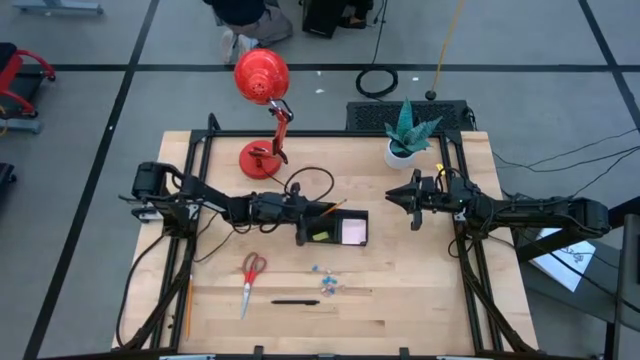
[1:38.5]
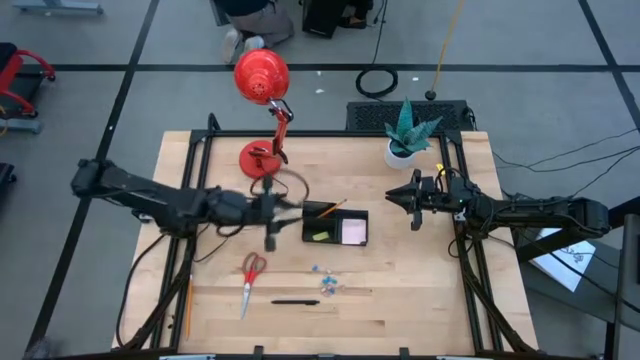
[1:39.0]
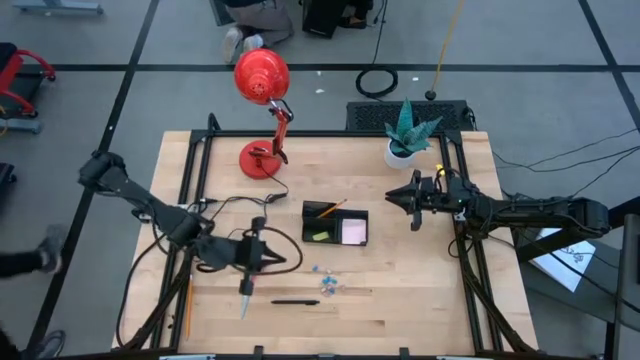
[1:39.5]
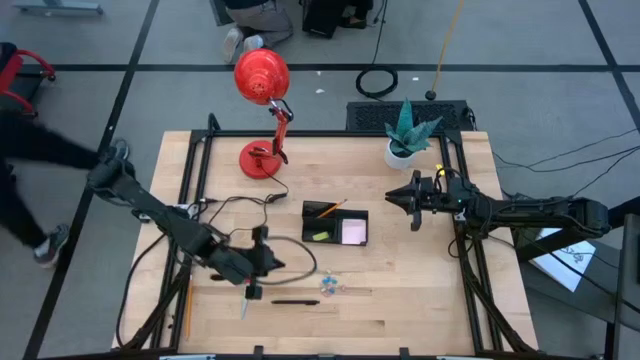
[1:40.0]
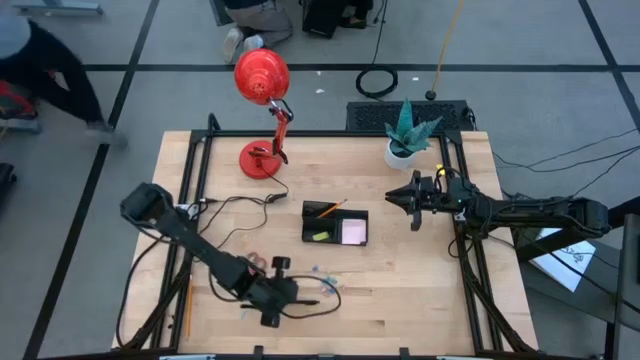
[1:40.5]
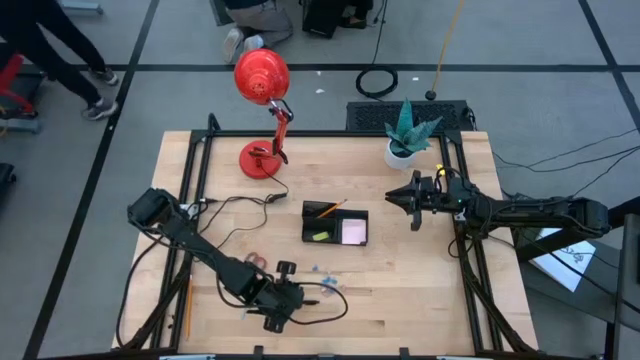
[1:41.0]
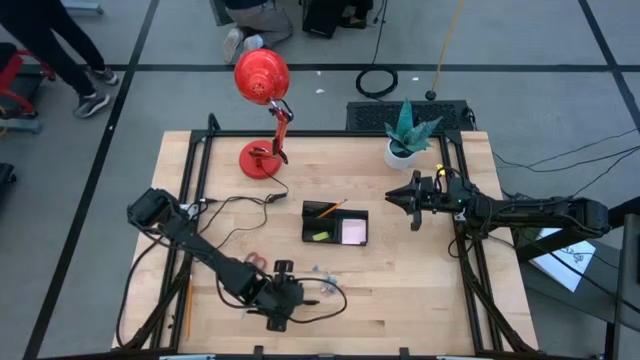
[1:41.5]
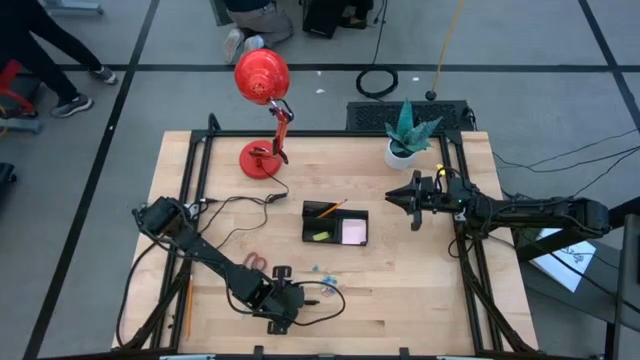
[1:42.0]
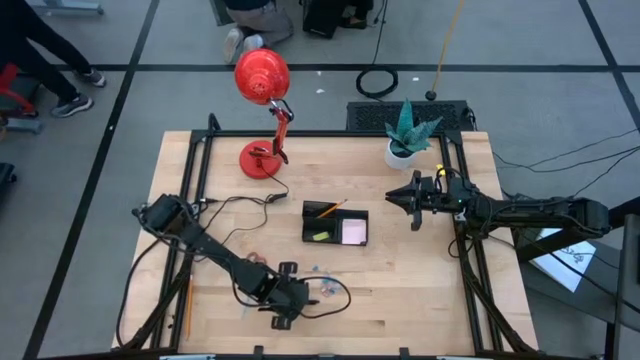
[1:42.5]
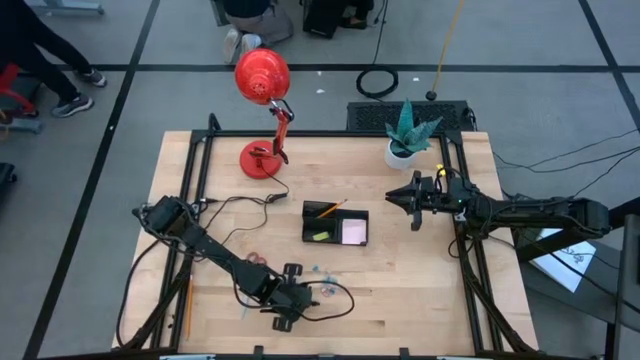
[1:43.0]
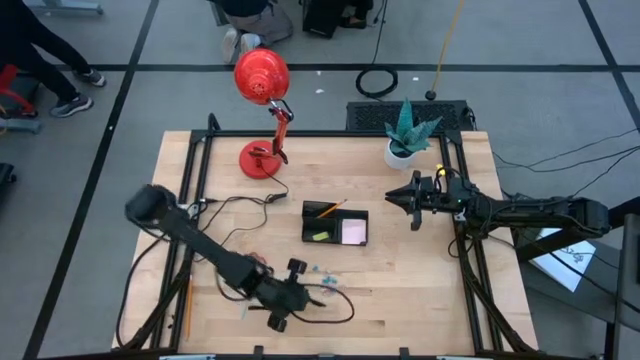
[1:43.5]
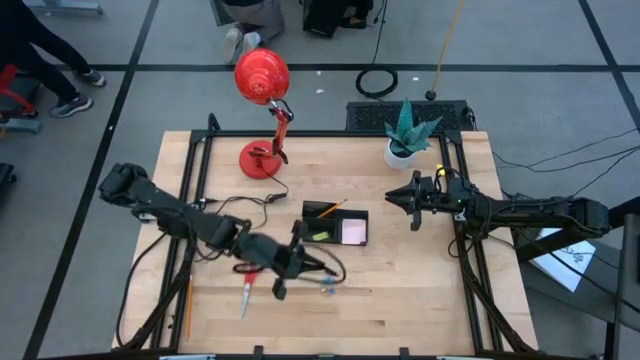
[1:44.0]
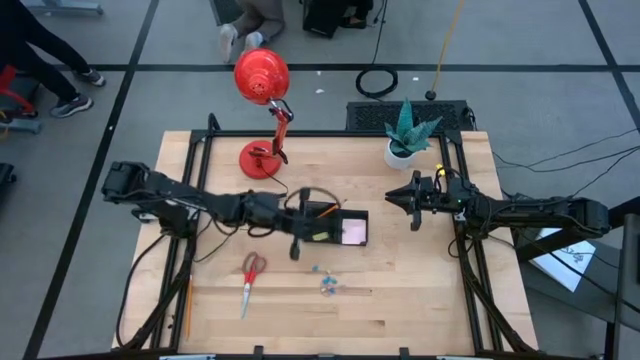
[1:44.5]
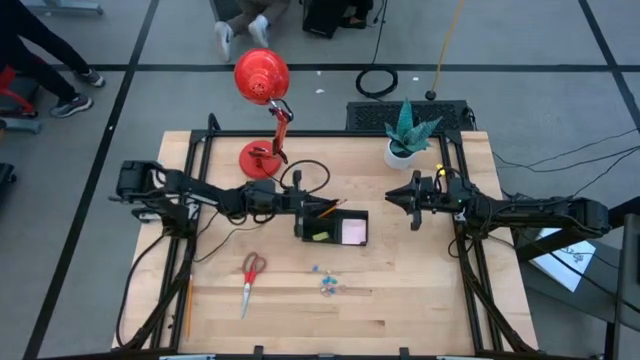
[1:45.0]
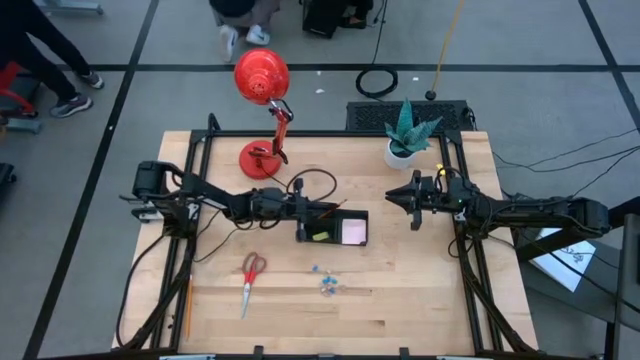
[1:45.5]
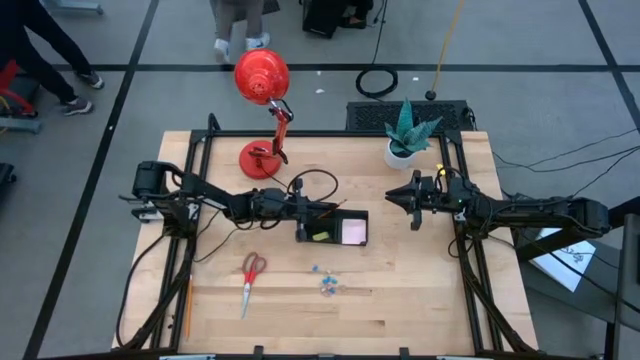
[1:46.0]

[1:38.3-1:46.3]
Task: Pick and place office supplies into organizer
Put the black pen into the black desk organizer

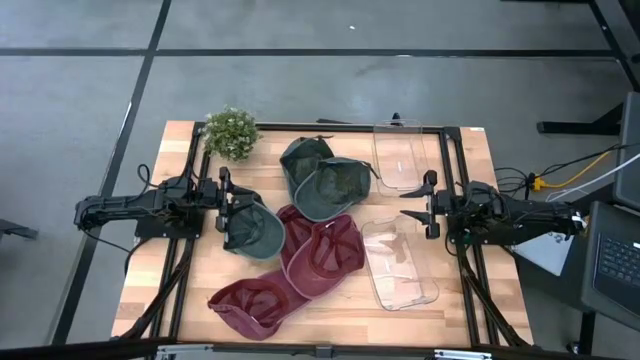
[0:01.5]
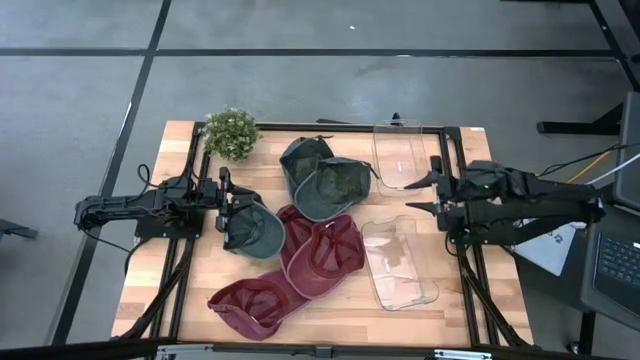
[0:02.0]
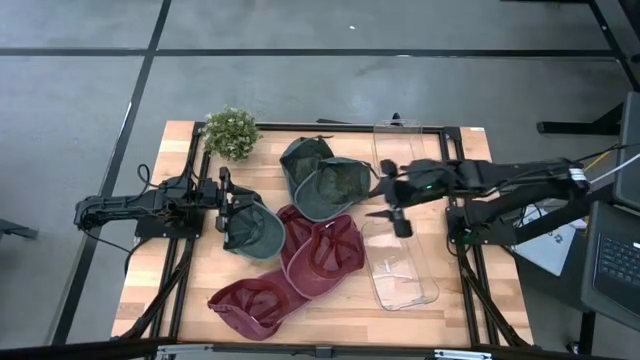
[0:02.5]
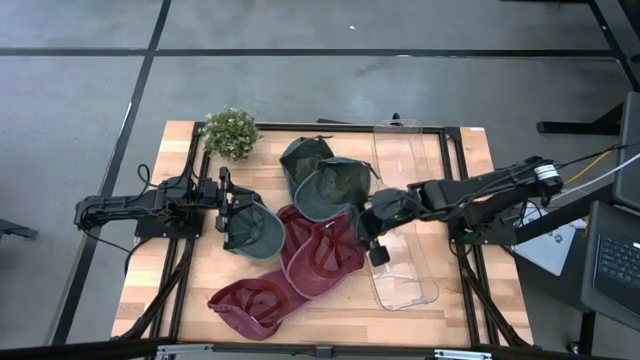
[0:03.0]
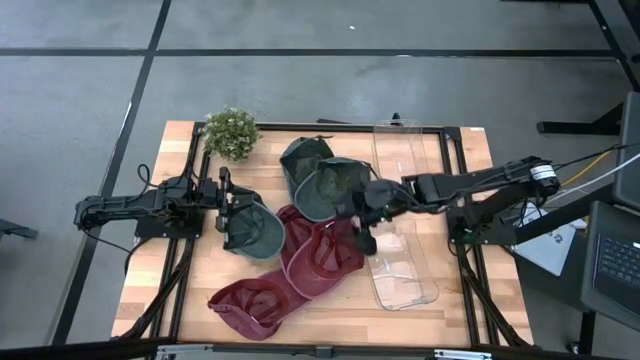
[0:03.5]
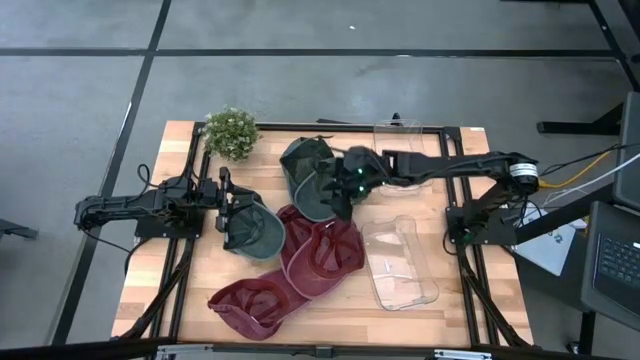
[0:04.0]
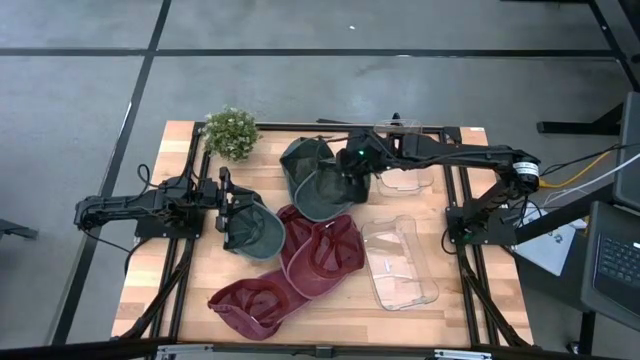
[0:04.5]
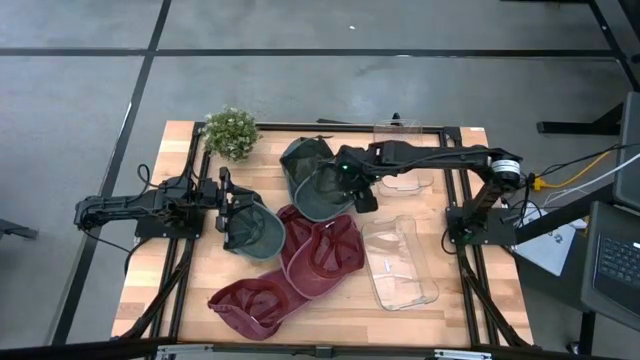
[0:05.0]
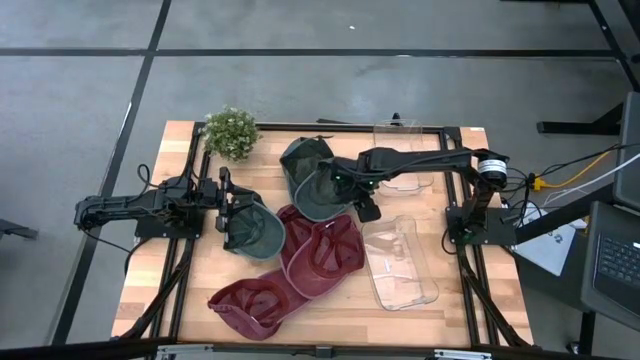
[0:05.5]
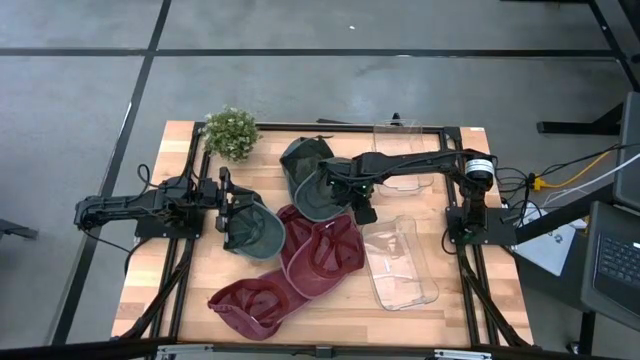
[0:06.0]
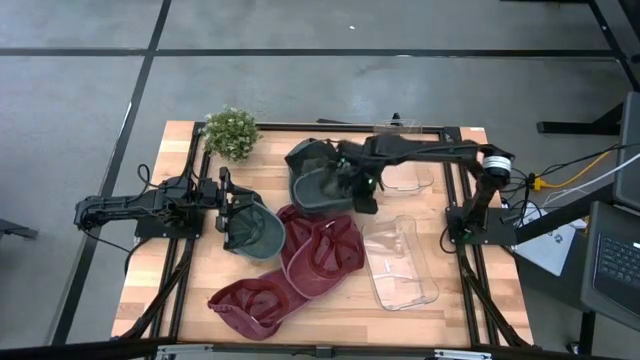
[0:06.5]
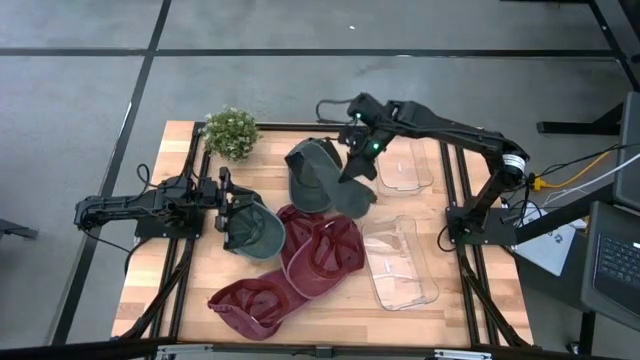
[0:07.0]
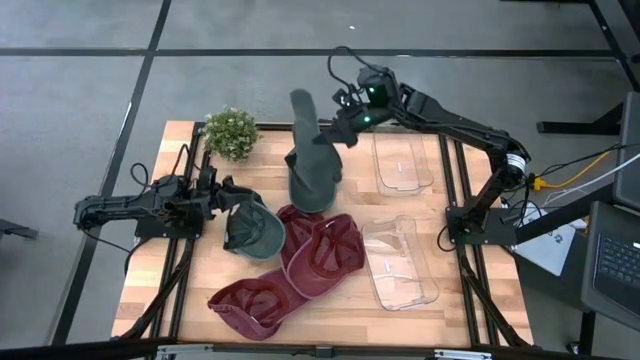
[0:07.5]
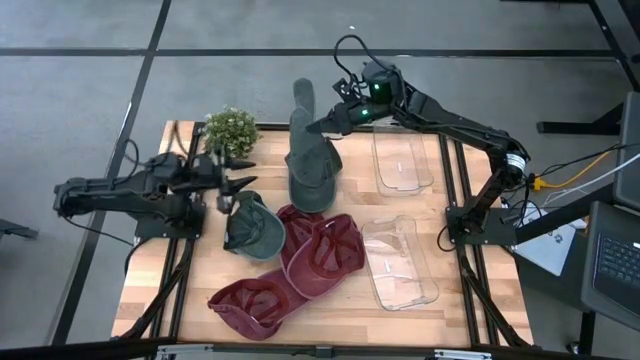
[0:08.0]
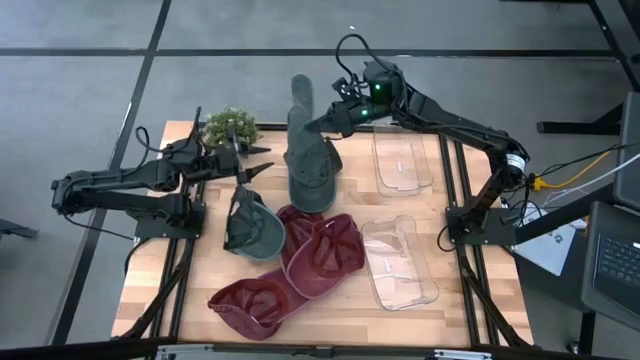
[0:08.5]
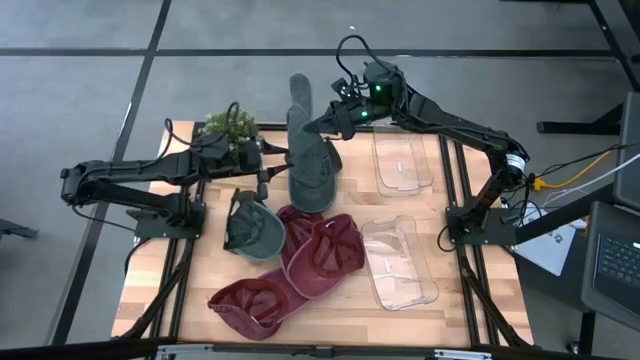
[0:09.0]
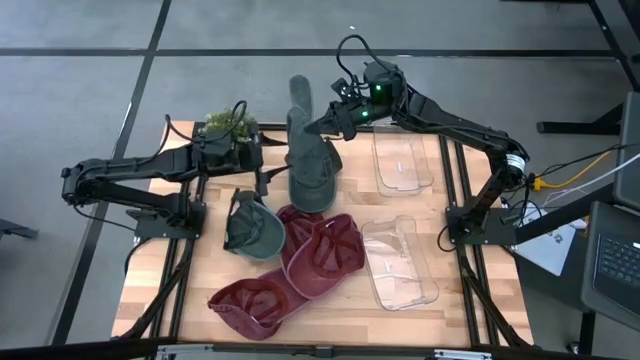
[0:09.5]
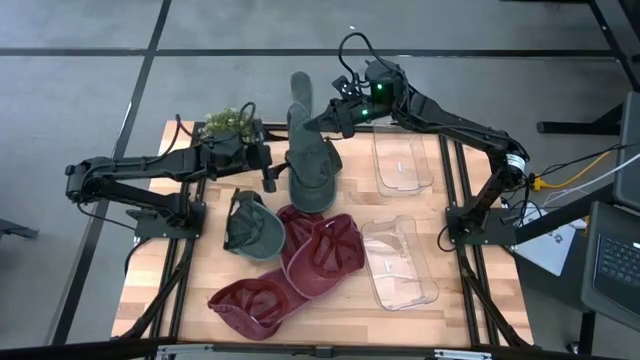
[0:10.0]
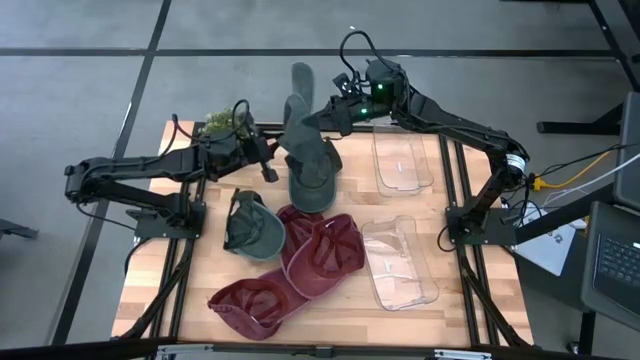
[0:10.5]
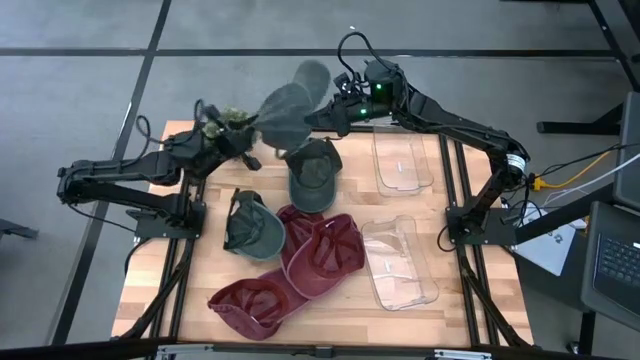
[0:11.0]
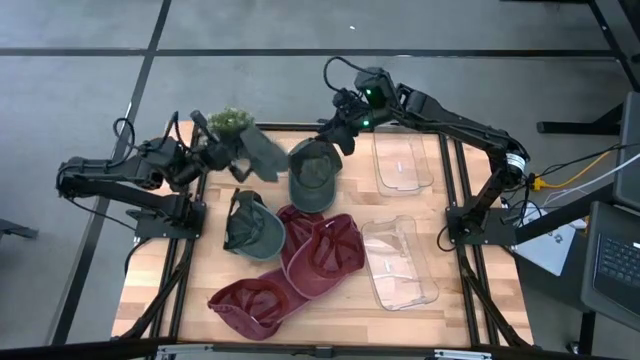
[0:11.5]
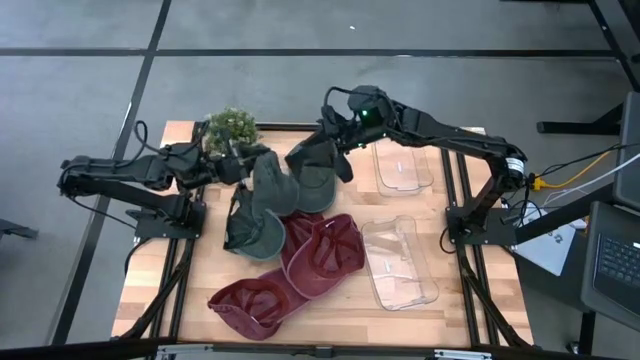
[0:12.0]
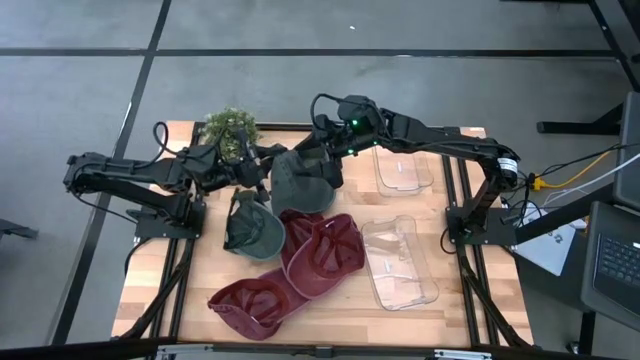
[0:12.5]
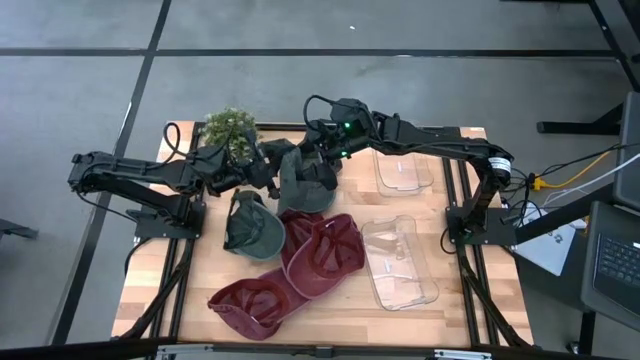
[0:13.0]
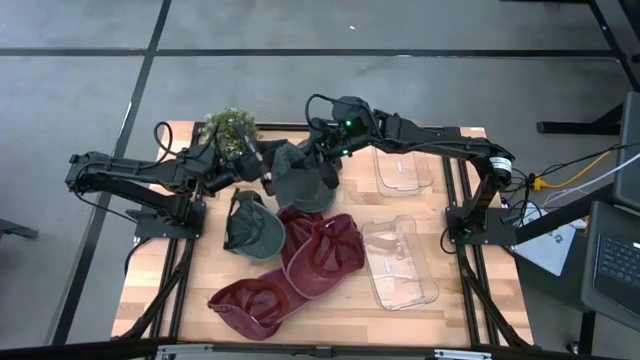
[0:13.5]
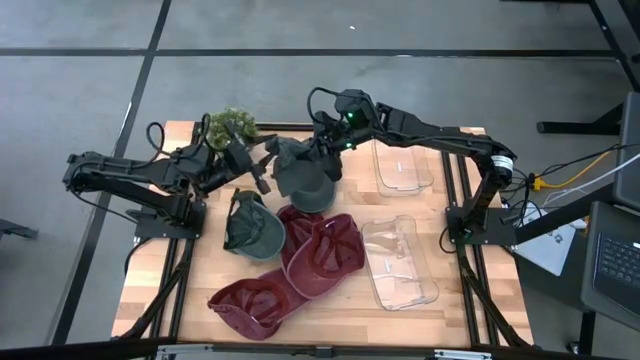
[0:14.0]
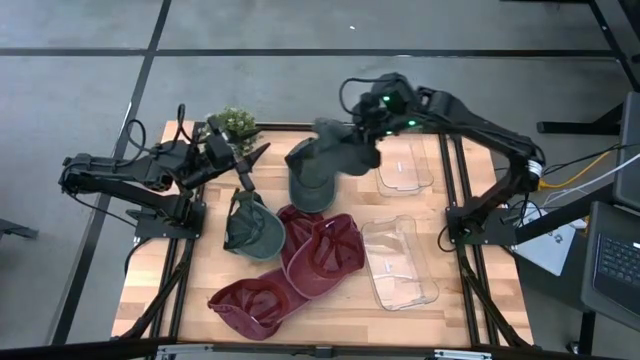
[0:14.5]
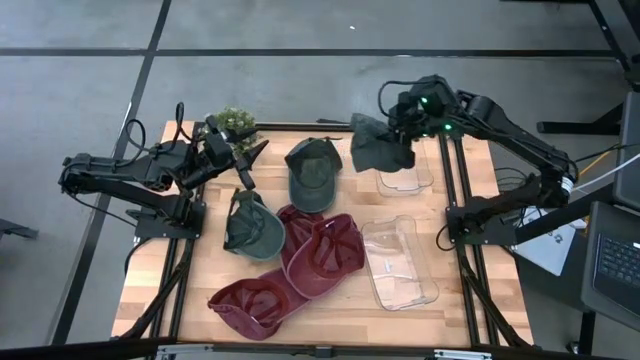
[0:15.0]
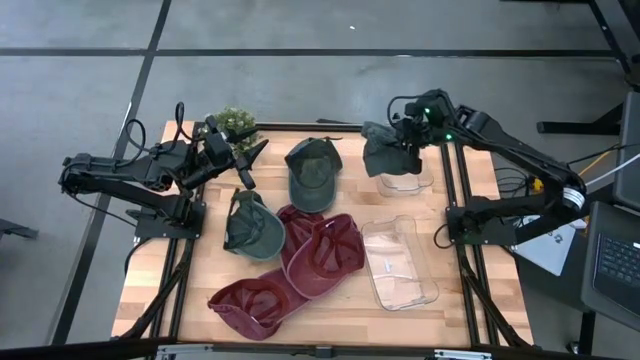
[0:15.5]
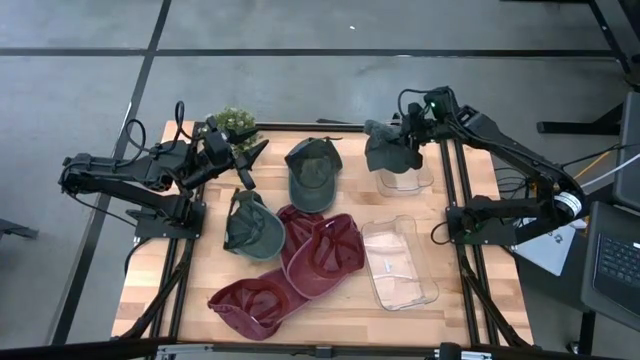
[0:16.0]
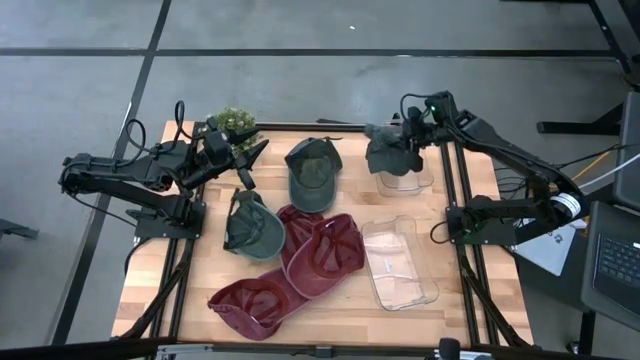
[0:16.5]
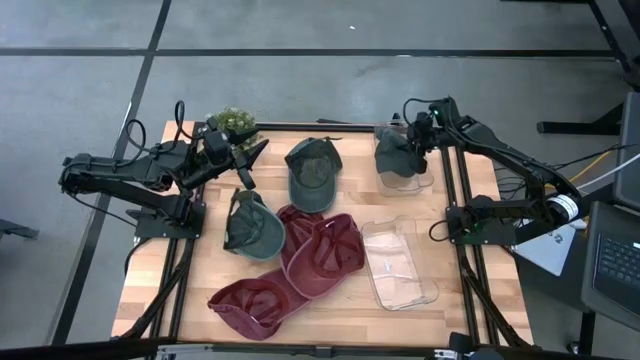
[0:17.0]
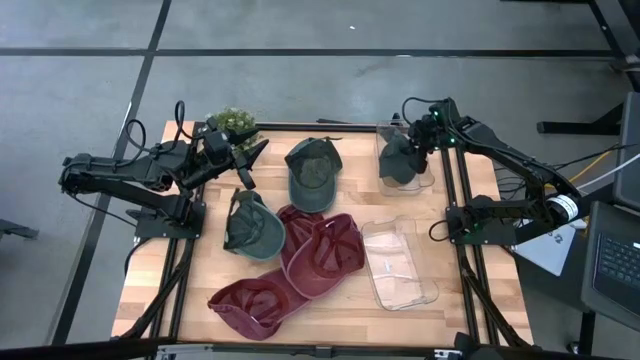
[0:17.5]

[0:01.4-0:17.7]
Task: Pick & Place hat
Put the right gray cap into the top transparent bin
